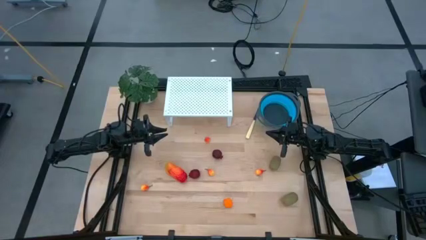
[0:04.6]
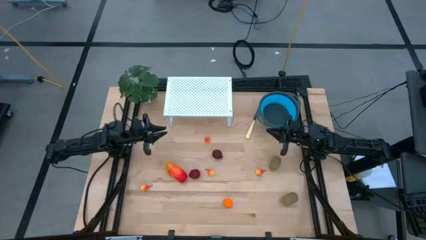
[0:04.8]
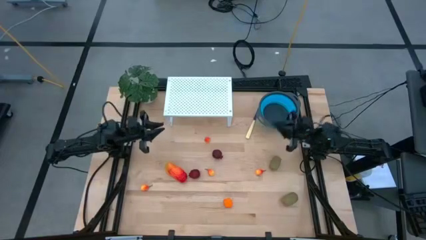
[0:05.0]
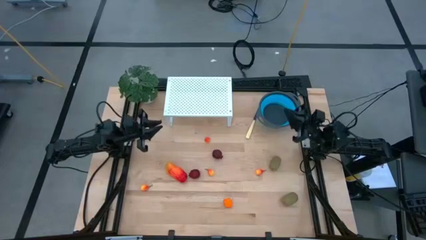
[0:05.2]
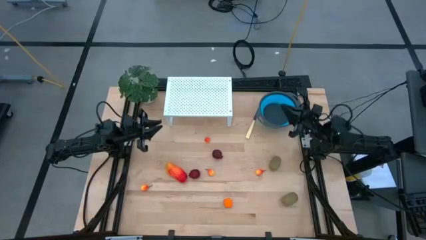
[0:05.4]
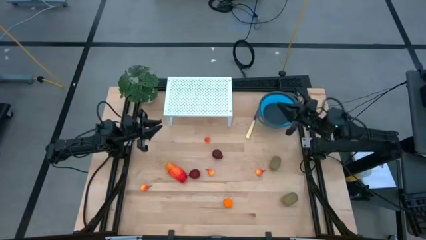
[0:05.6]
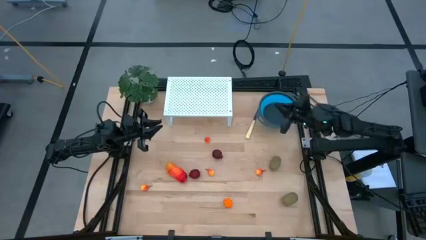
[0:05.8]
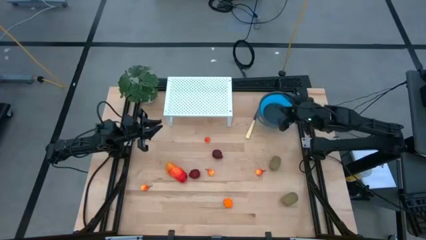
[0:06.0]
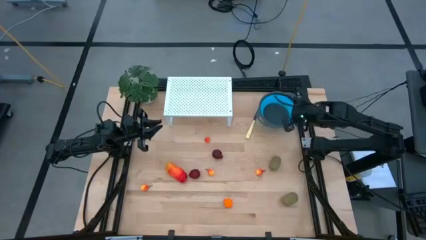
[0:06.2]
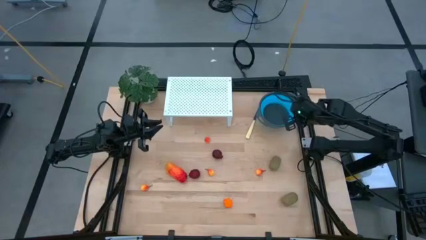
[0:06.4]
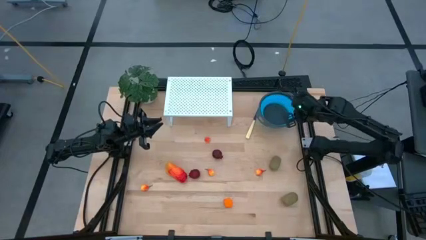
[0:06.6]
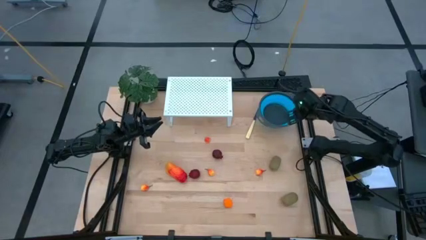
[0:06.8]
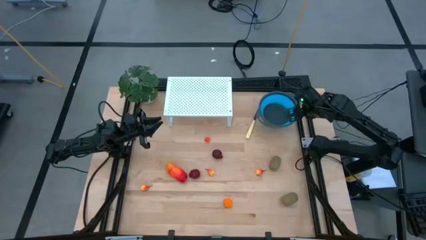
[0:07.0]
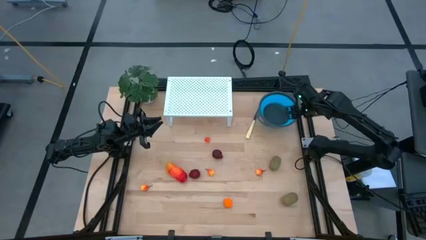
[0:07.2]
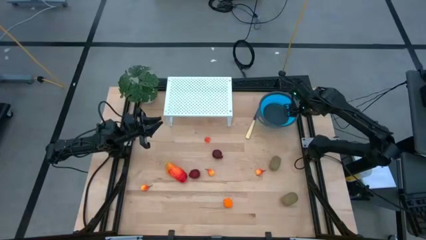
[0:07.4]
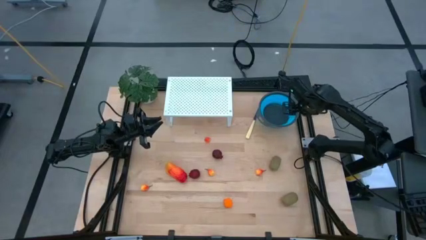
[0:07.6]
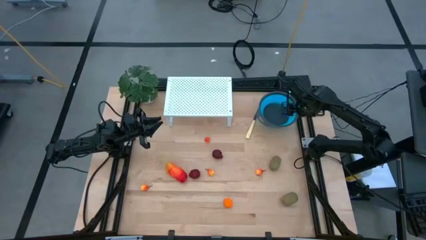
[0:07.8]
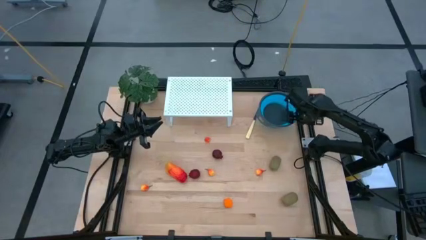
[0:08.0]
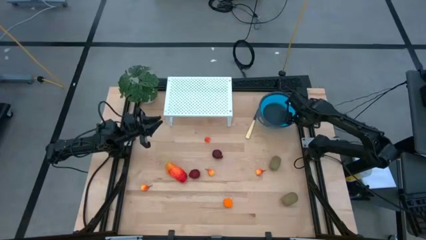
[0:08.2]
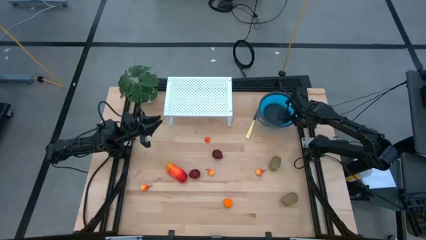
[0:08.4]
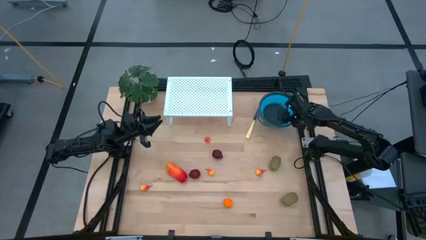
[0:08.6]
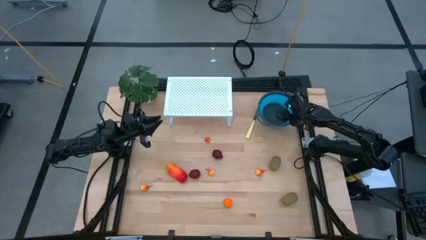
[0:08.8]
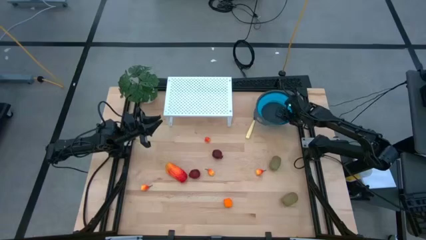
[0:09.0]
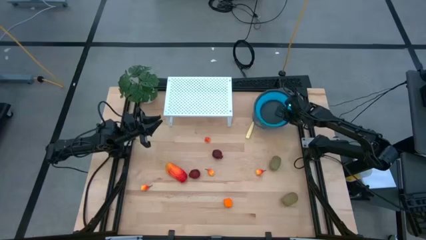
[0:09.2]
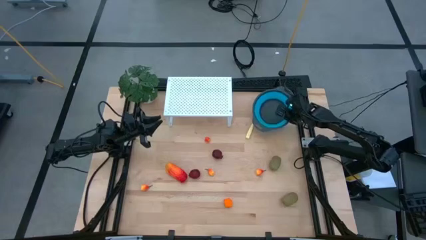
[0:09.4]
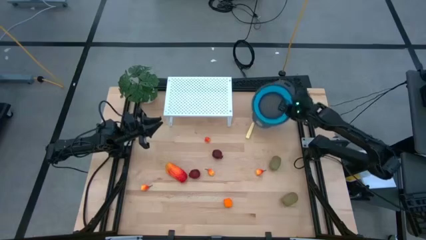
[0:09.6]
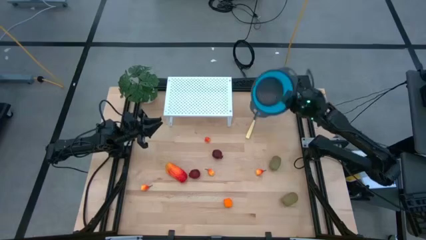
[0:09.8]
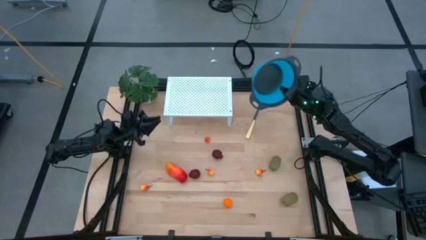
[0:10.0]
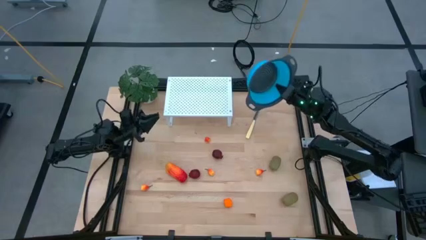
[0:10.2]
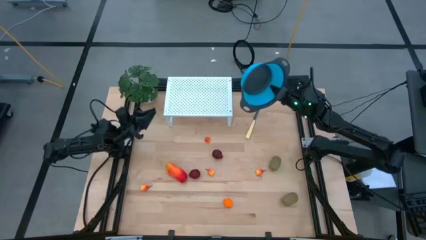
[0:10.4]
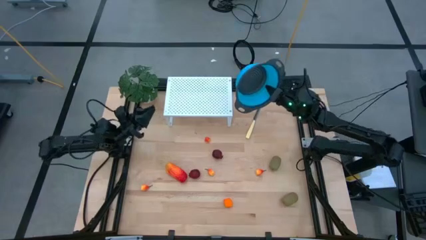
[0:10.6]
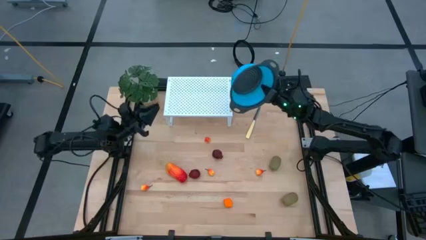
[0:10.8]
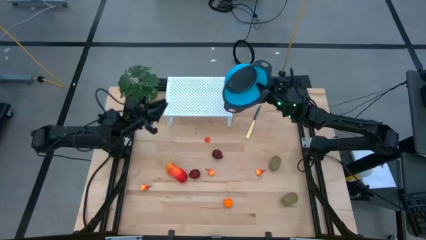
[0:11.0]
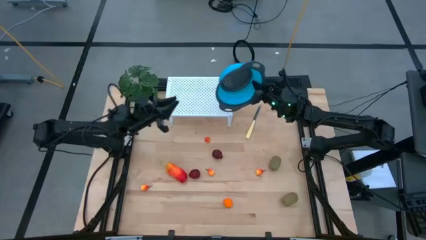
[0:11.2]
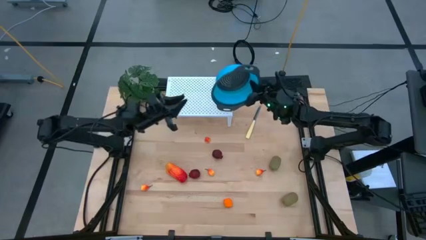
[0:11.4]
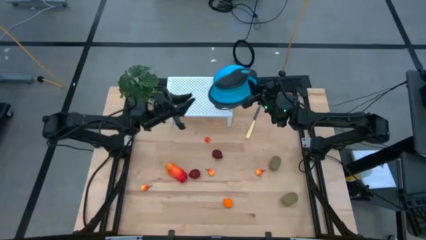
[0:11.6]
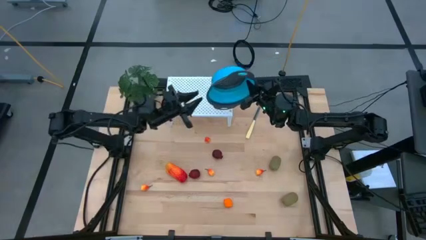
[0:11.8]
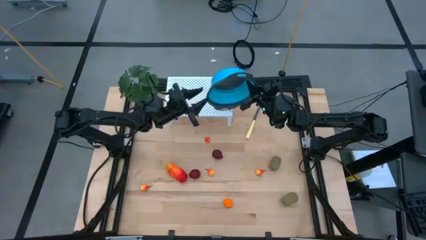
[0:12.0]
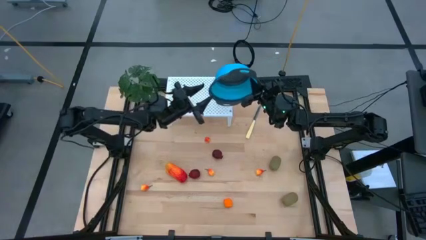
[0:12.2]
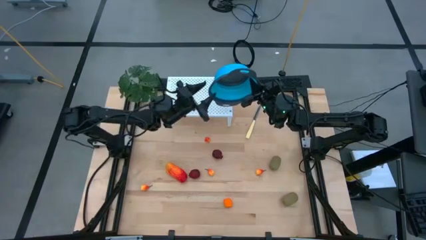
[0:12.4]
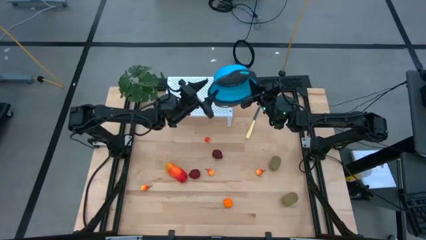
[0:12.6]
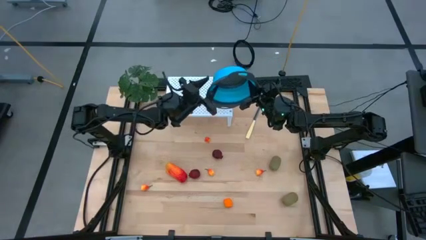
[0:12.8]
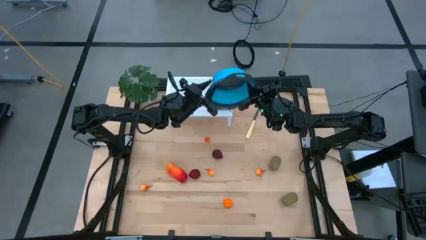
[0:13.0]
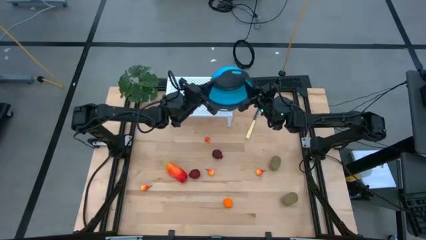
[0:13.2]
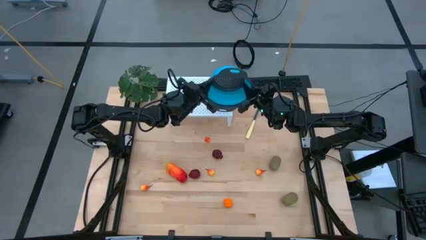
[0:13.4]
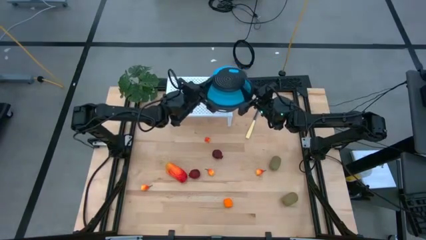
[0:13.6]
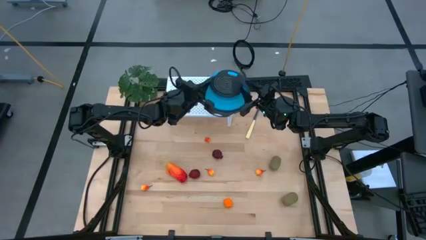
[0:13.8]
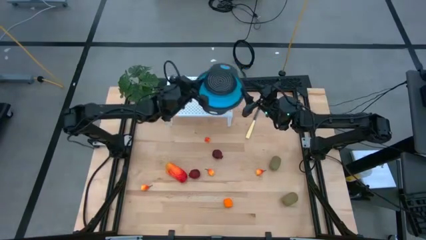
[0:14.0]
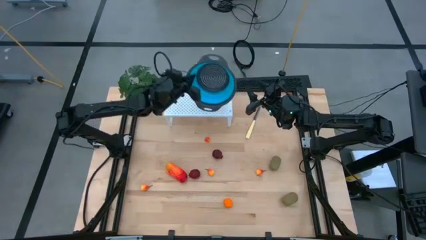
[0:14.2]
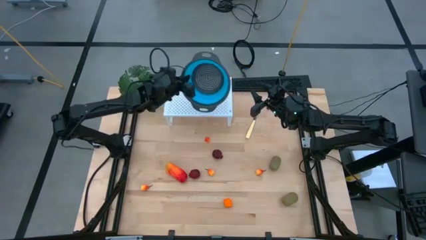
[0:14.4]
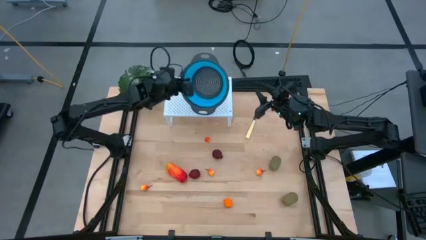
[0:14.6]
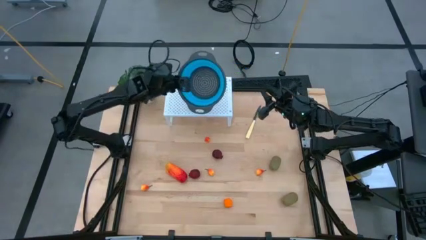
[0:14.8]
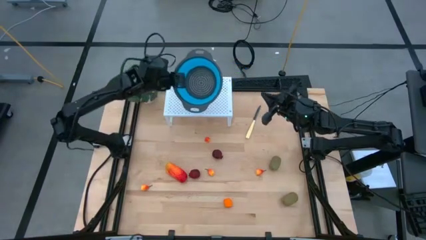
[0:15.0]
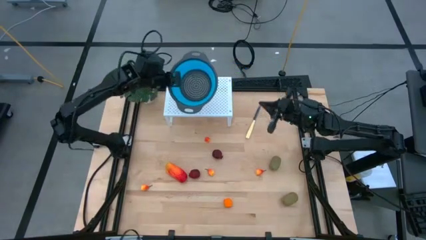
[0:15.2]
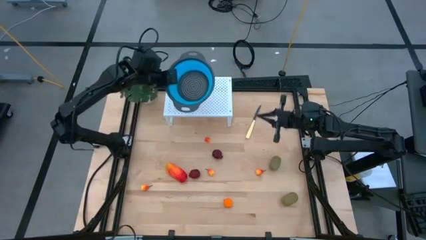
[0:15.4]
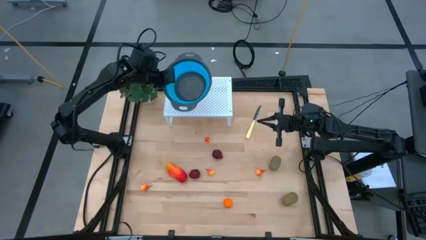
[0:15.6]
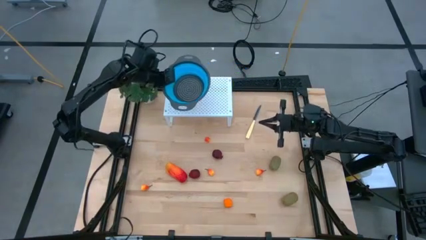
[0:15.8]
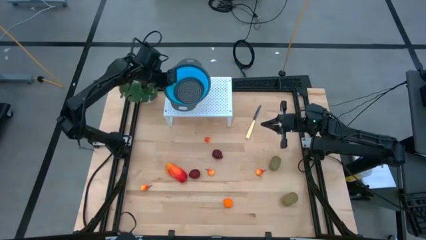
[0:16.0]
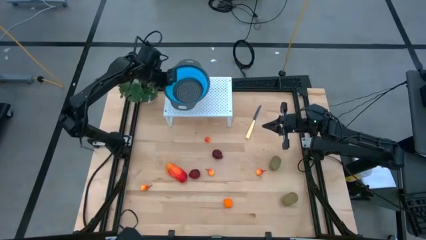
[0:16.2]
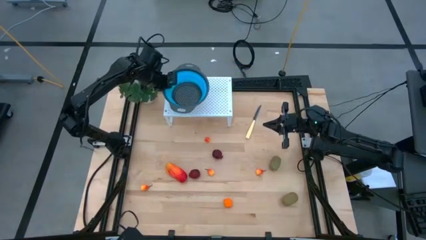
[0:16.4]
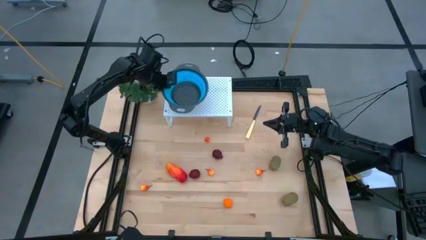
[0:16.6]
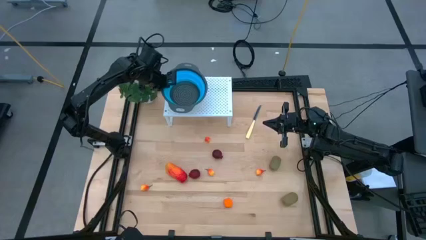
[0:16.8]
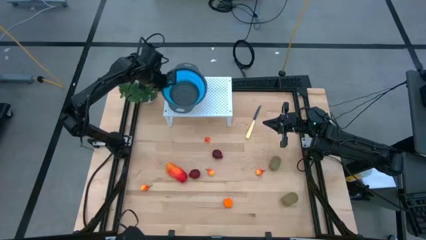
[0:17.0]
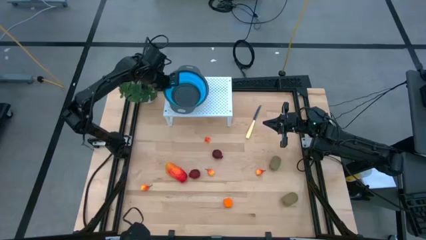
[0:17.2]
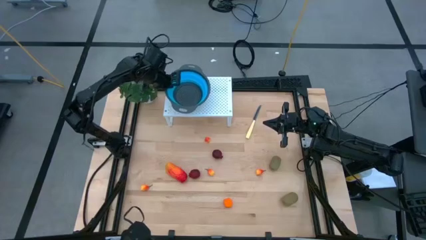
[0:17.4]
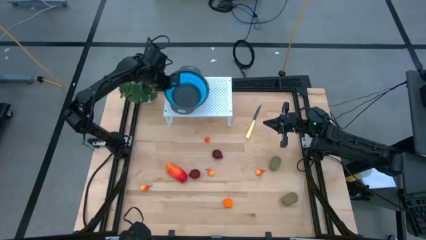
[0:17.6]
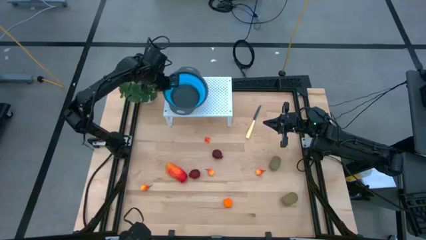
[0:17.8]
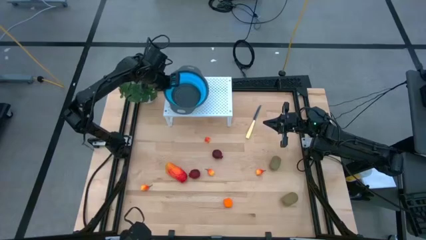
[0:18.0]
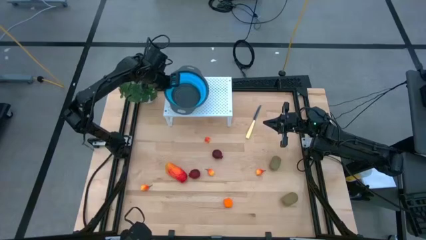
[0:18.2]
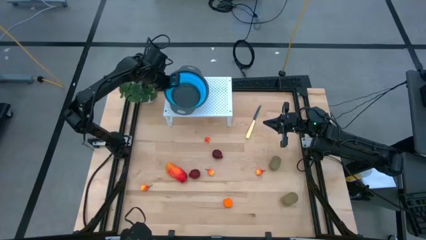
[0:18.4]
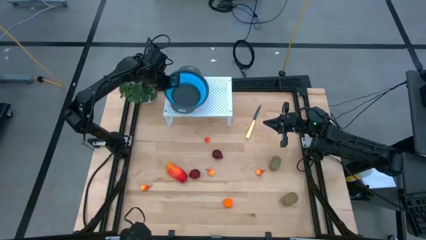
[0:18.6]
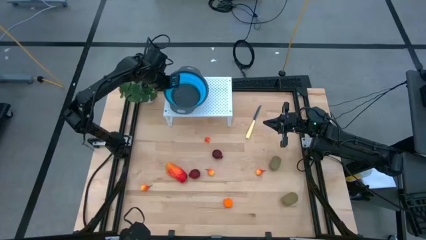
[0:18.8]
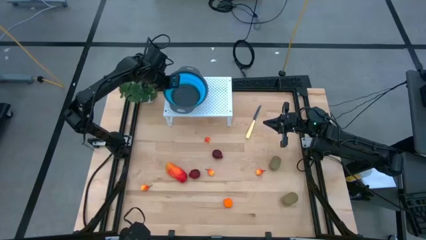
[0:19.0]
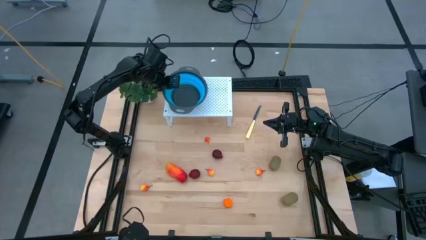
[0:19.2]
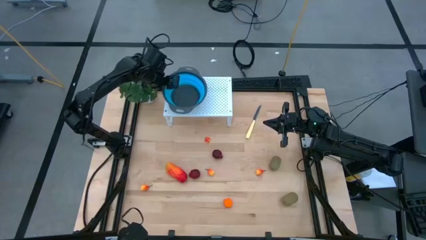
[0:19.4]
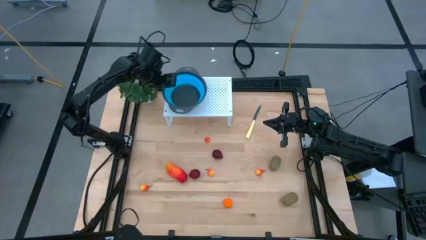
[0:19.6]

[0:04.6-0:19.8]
Task: Pick & Place Fruit
Put the strainer bowl on the shelf
